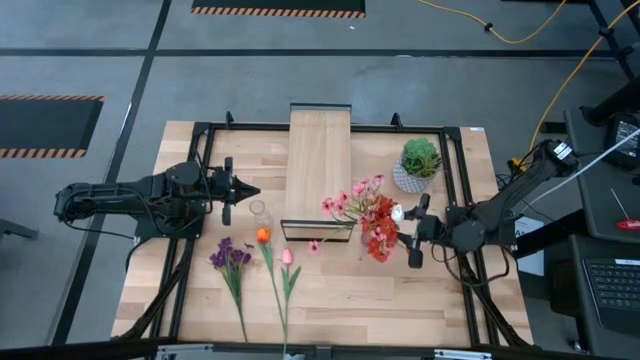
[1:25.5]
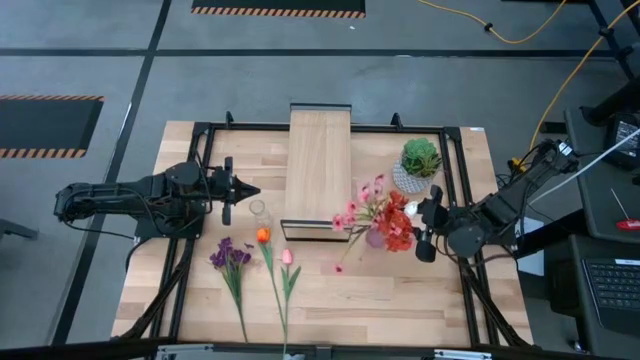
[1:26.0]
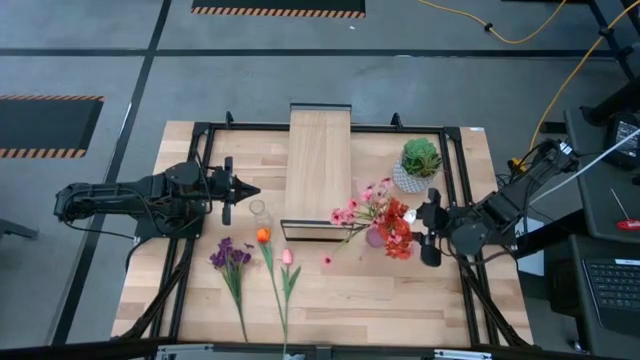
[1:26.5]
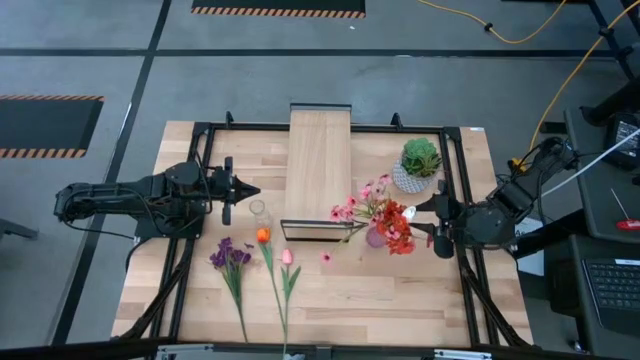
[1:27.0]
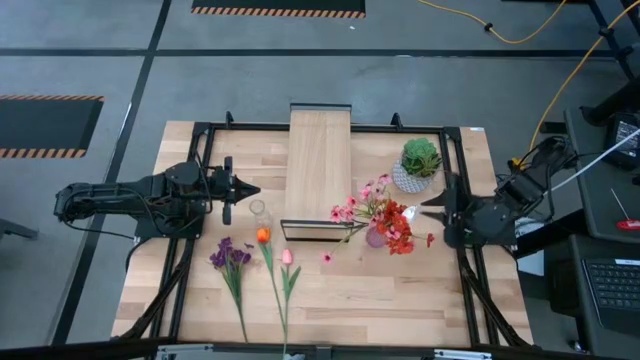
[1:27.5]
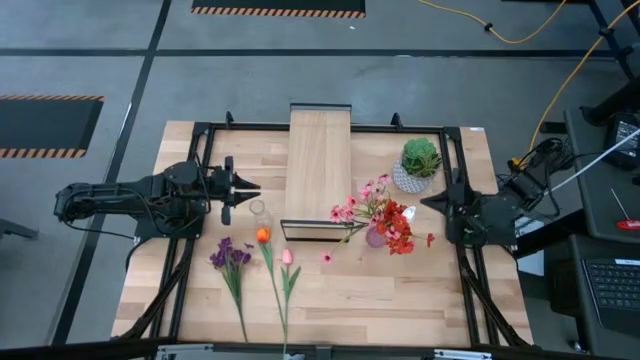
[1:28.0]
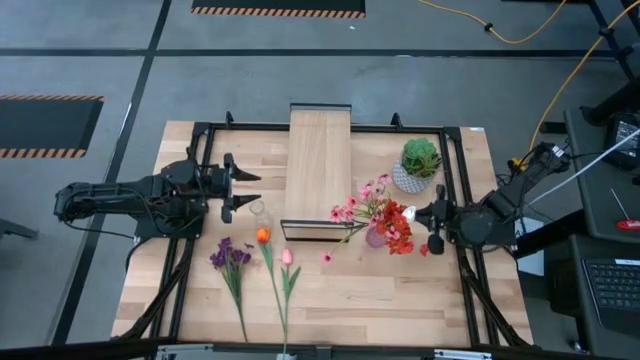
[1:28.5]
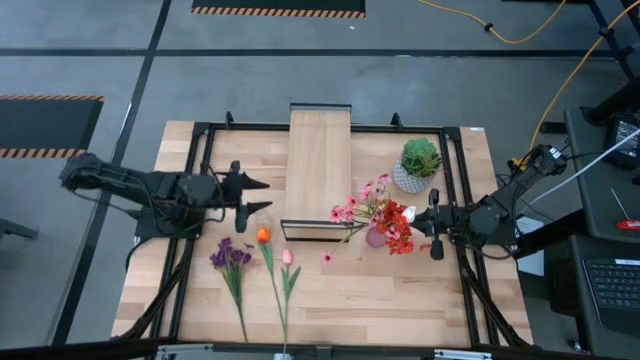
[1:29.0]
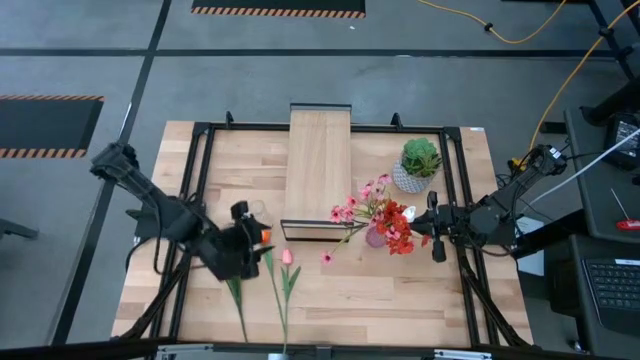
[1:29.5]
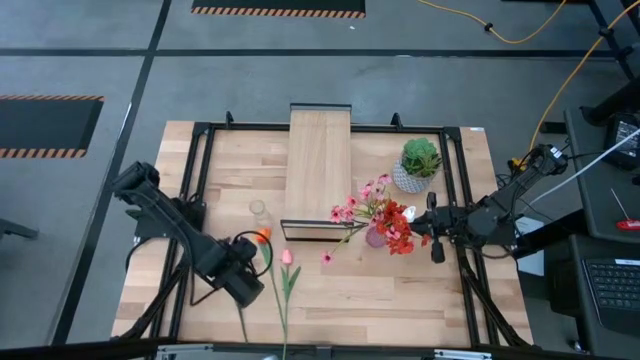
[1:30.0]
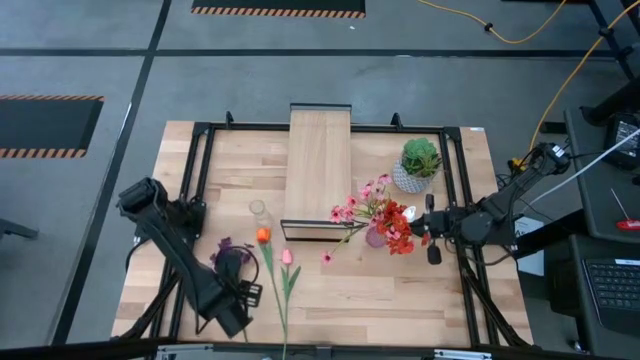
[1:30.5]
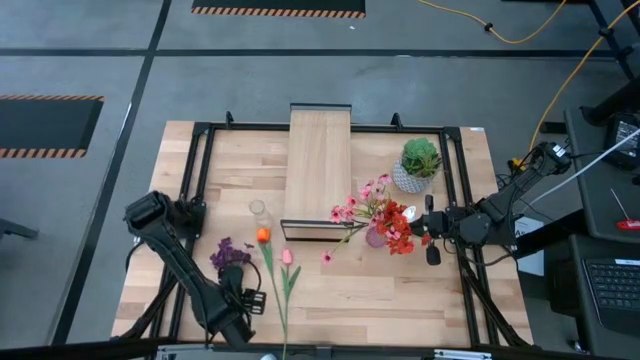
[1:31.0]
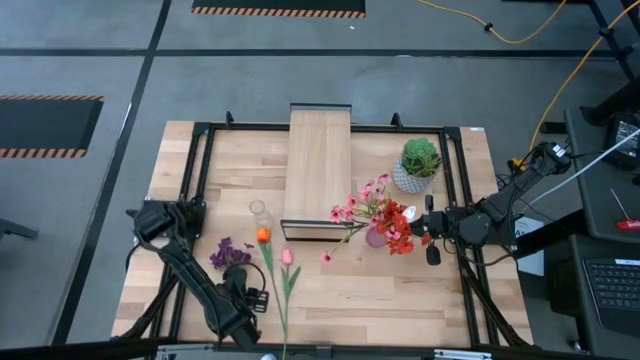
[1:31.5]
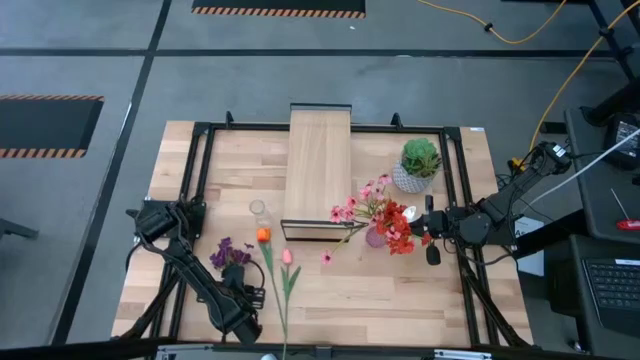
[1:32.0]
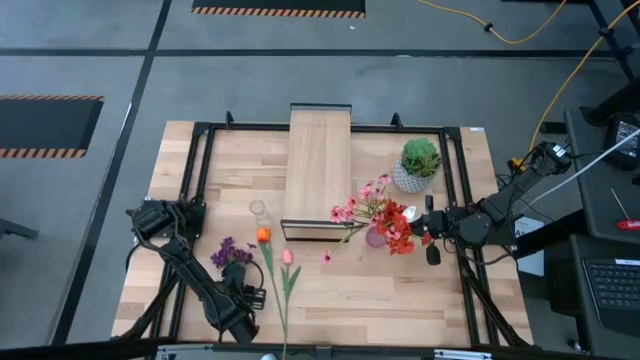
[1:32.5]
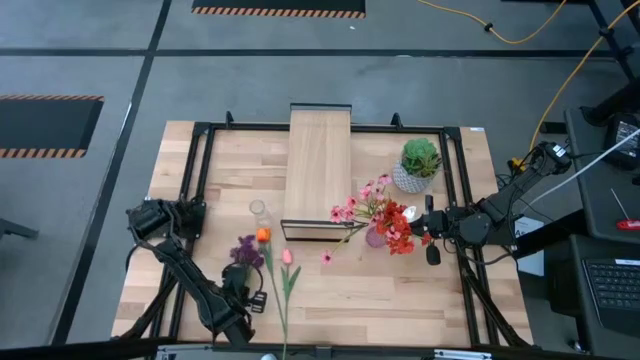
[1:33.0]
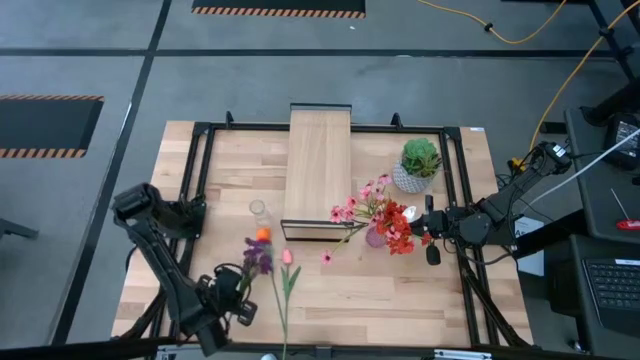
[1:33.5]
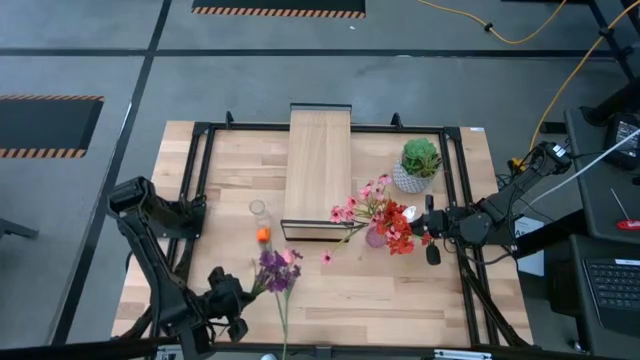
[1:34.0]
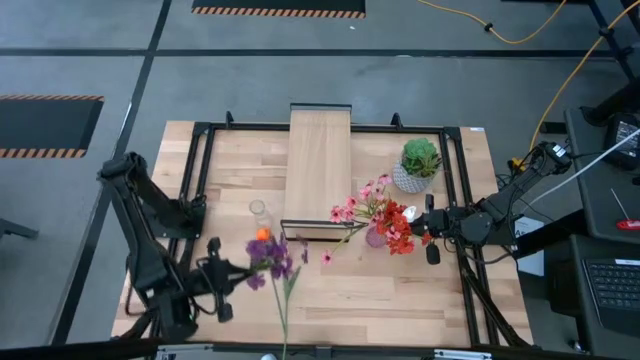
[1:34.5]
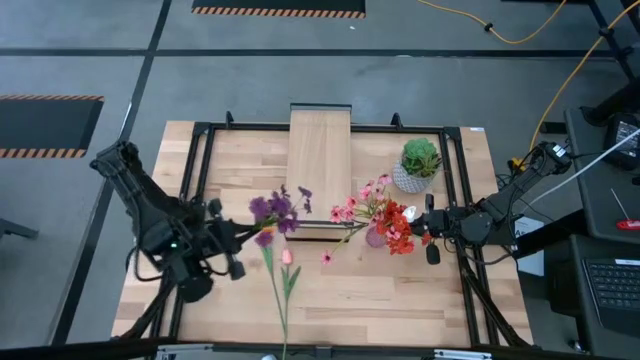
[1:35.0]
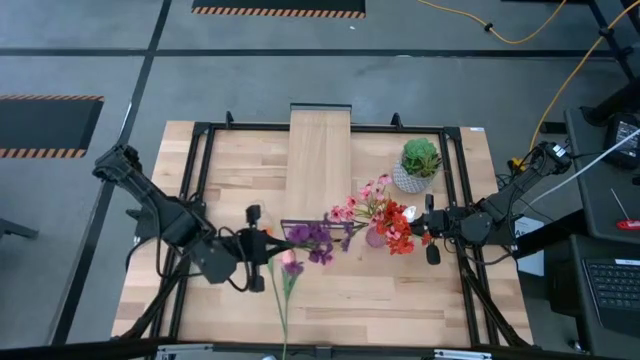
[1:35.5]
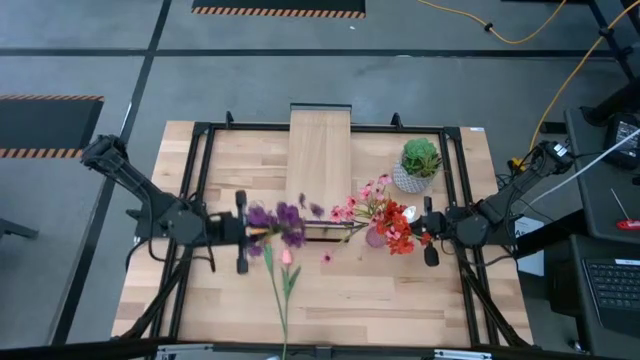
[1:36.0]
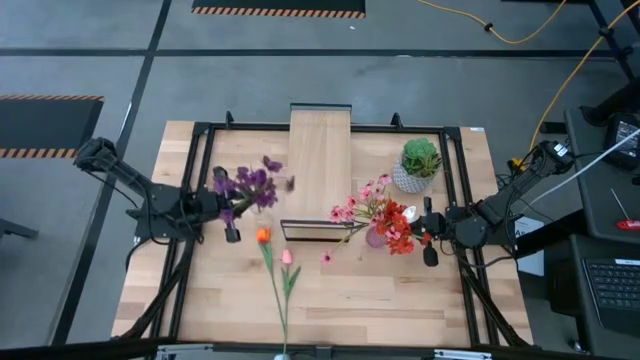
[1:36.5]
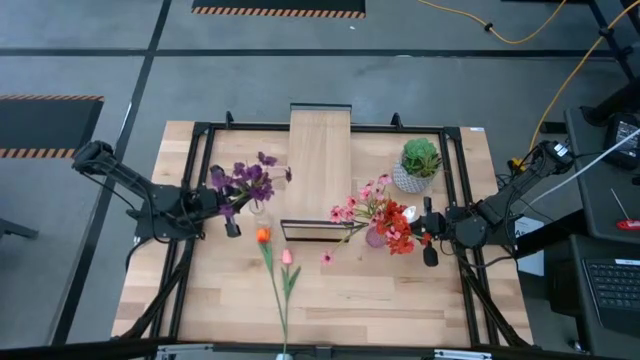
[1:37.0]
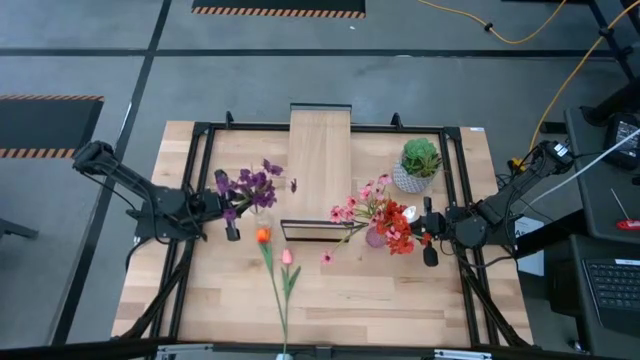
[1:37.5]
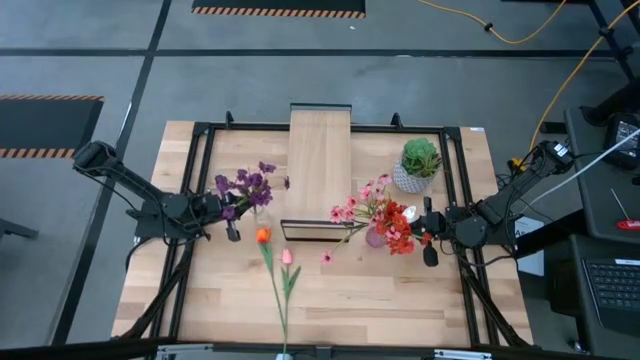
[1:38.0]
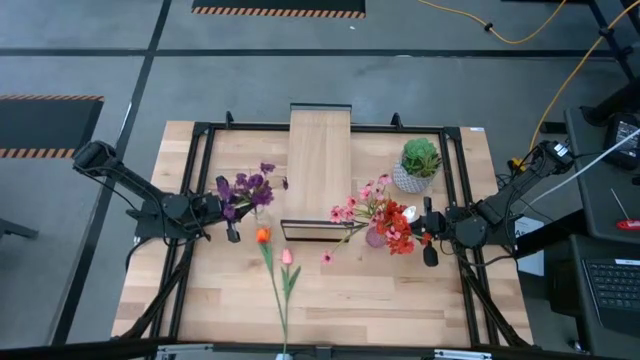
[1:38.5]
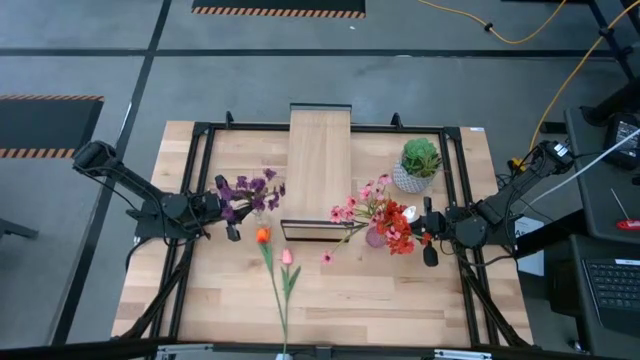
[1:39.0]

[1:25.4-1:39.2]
Task: Pick and place flowers into a vace then onto a shelf
Put the purple flowers into the transparent vase

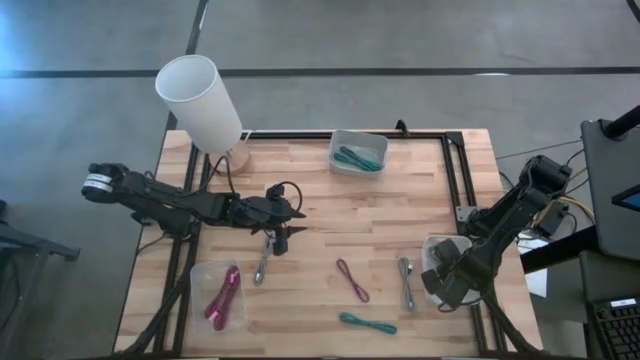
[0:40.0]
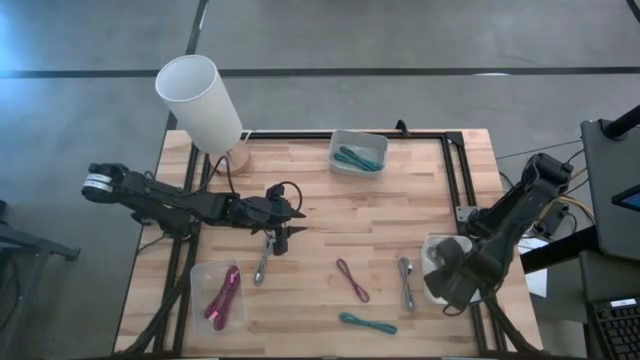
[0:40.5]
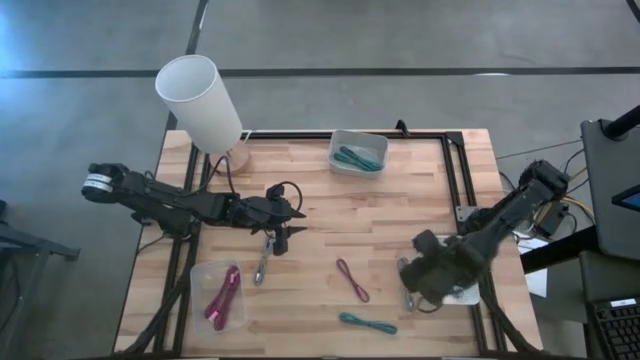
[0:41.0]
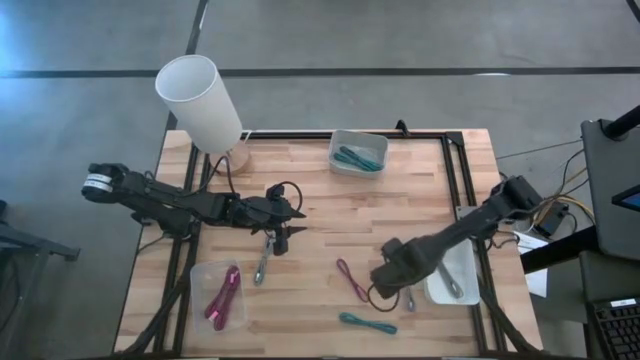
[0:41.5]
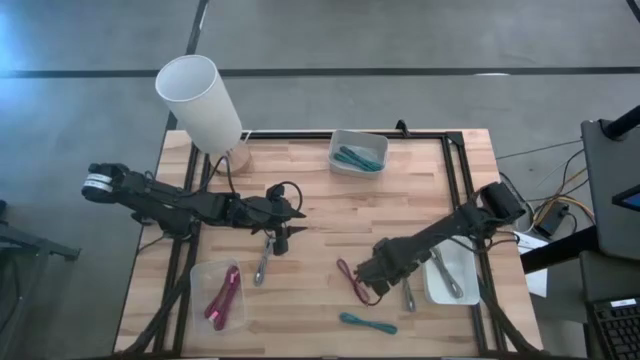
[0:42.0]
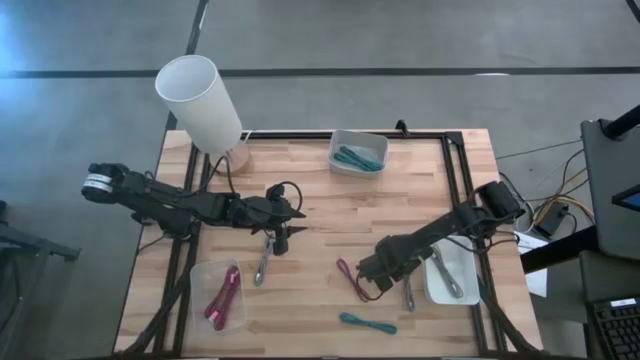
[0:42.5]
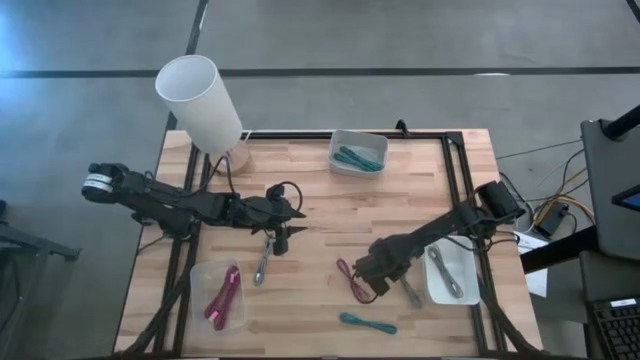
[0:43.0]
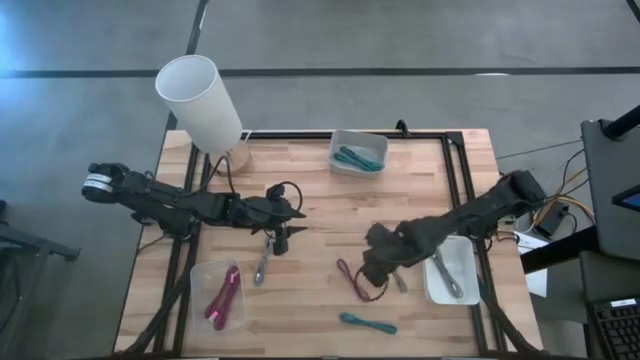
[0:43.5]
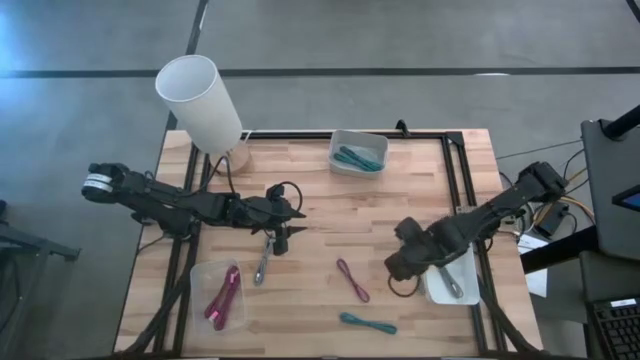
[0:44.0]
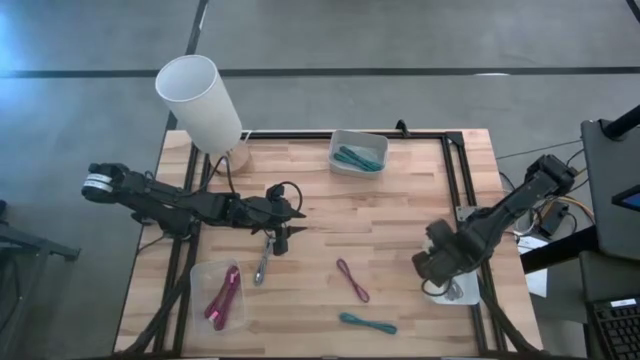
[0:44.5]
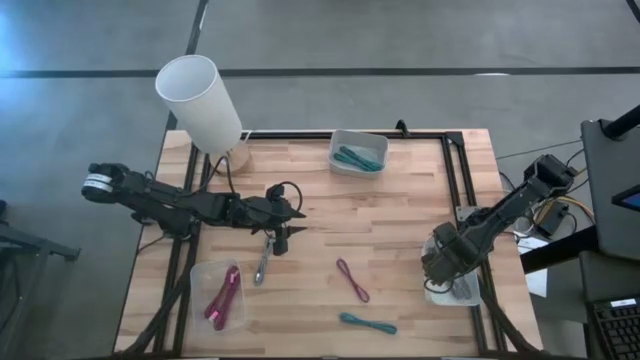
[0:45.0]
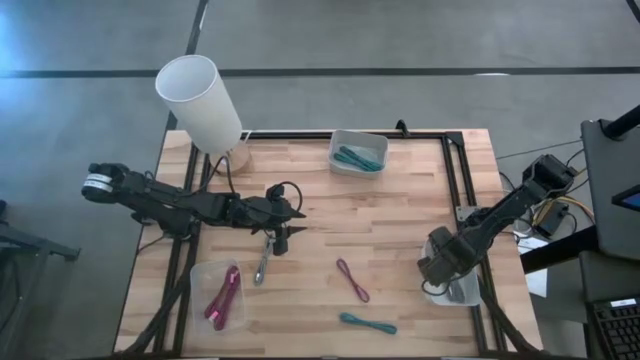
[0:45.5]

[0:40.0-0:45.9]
Task: Pick & Place USB Port
Put the right white striped charger cable into the white striped bin

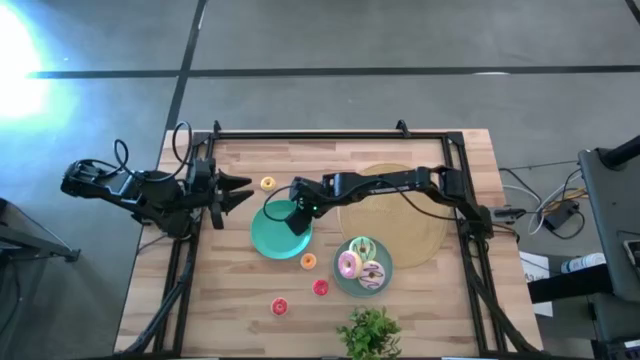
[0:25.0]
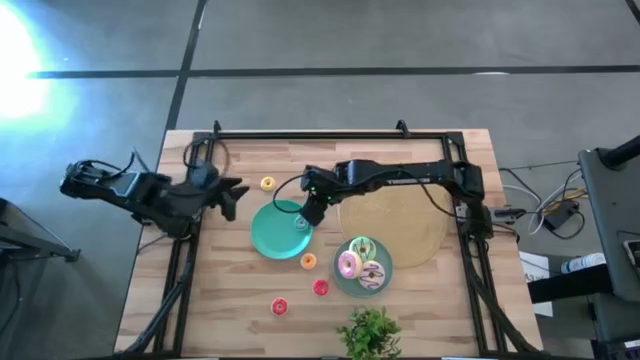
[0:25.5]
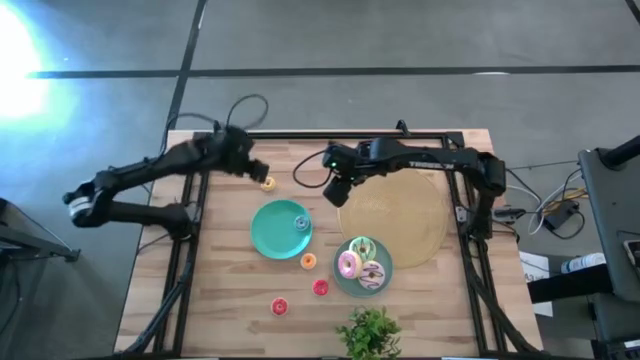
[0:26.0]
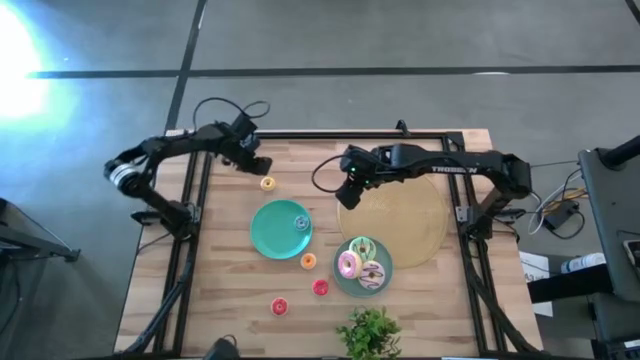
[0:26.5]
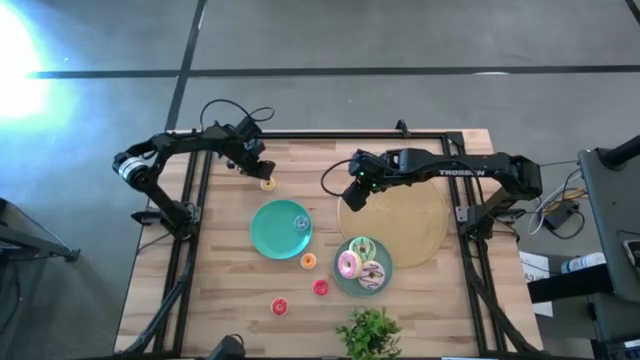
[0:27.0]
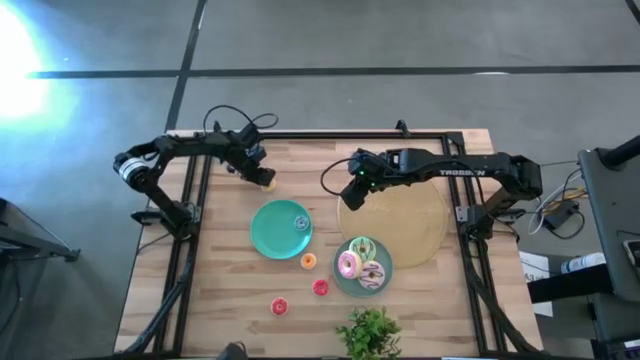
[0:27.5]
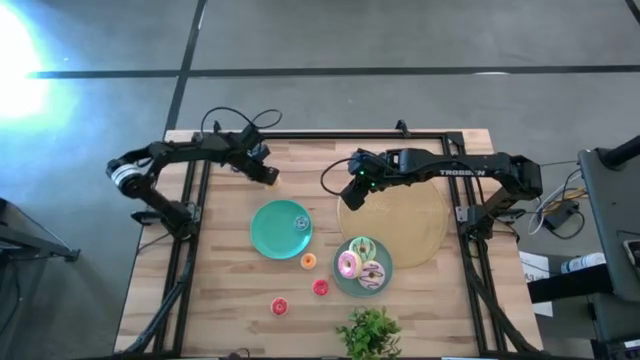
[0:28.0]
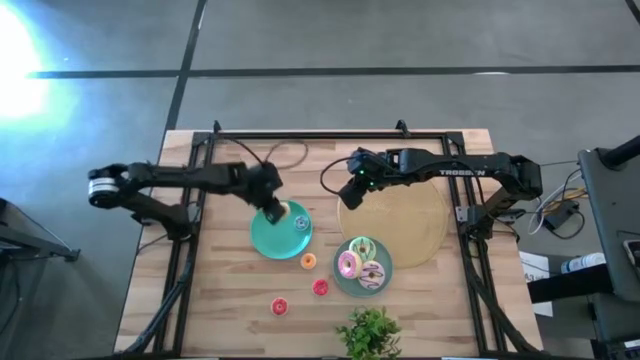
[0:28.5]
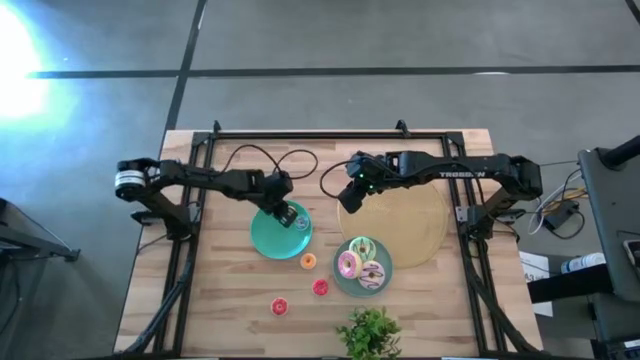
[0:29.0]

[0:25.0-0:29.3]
Task: Pick & Place donuts
Put the small yellow donut on the green plate
